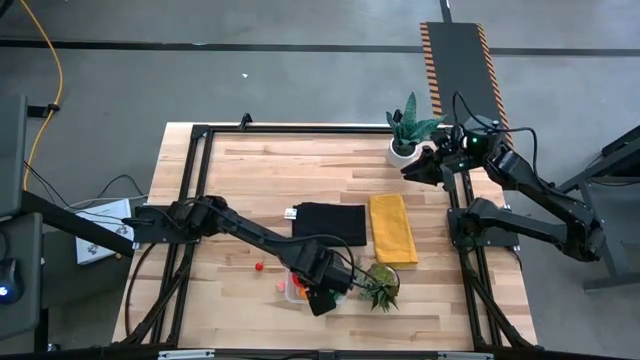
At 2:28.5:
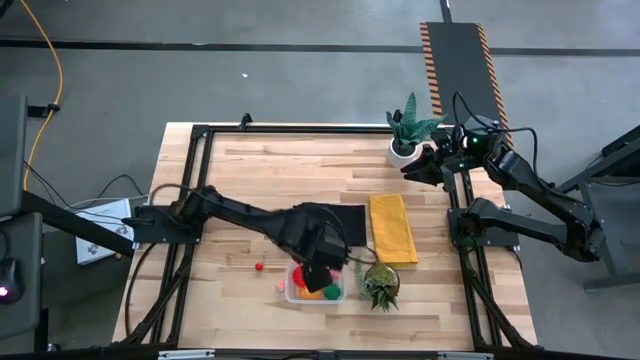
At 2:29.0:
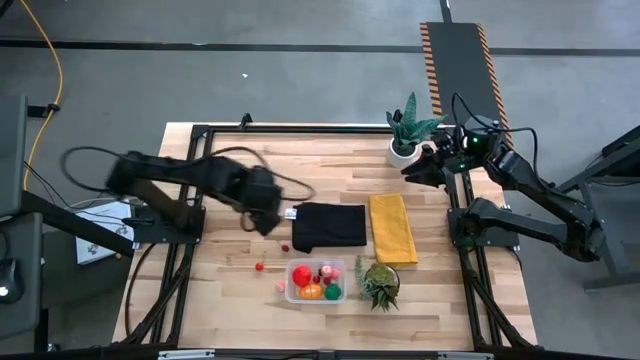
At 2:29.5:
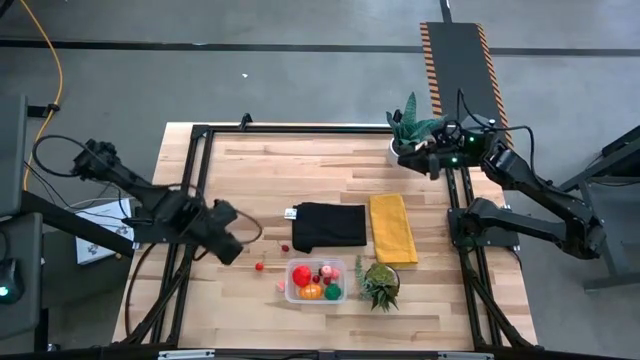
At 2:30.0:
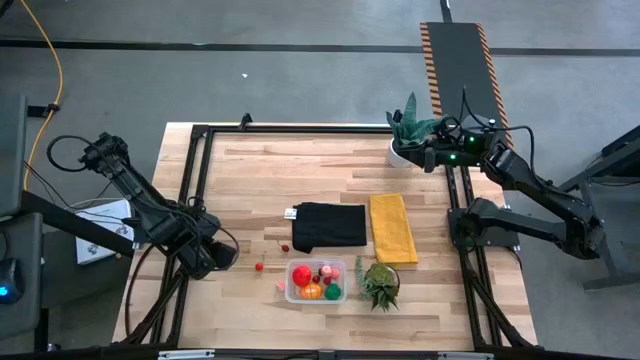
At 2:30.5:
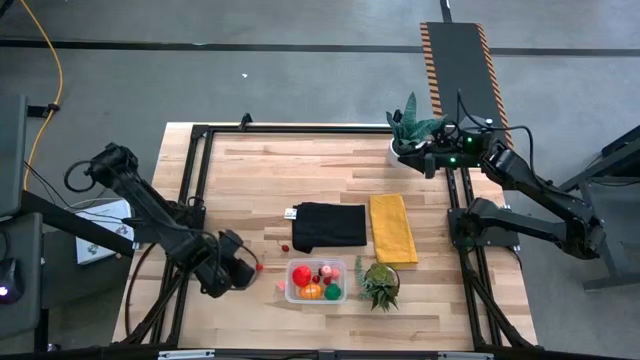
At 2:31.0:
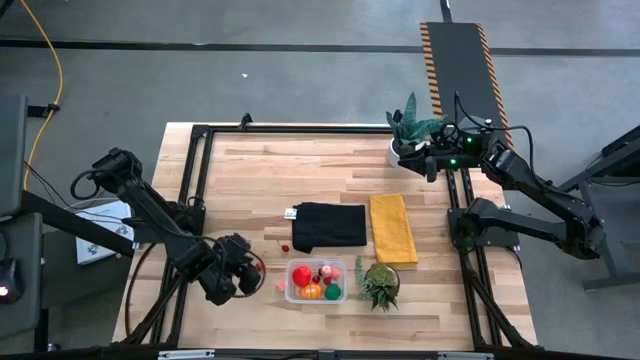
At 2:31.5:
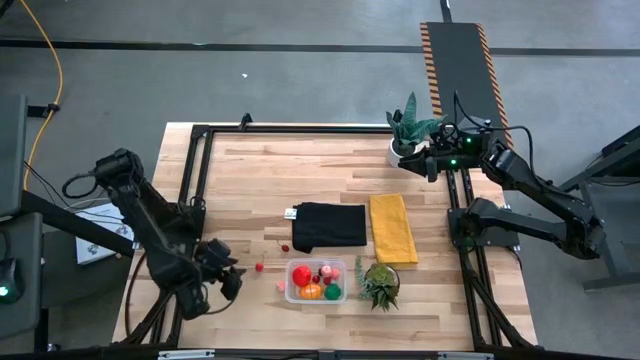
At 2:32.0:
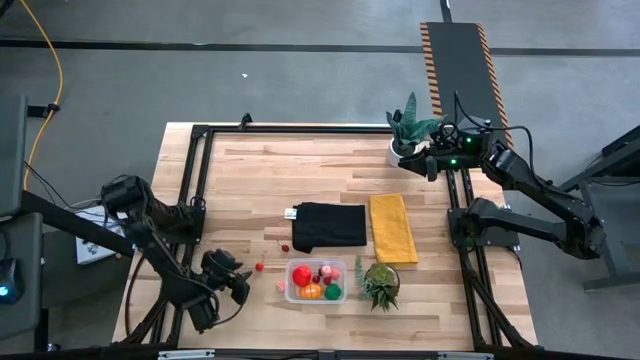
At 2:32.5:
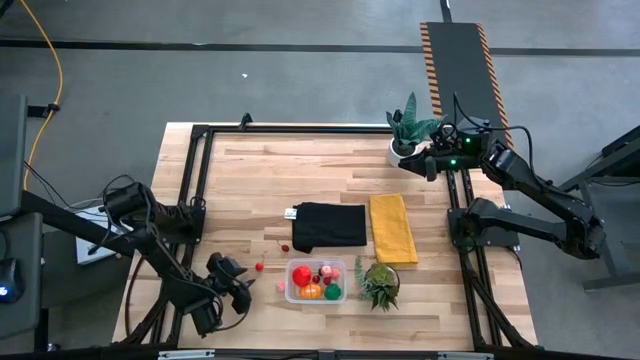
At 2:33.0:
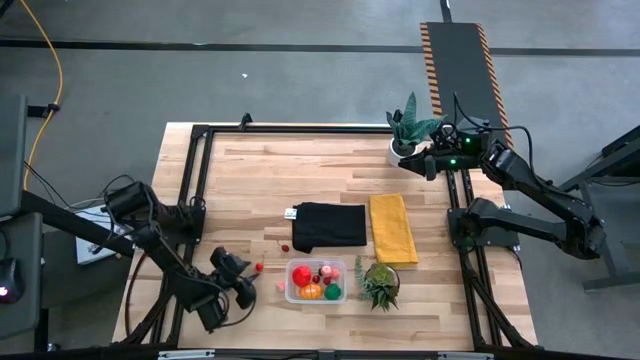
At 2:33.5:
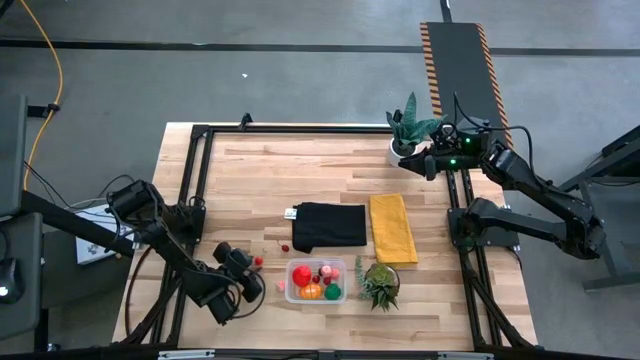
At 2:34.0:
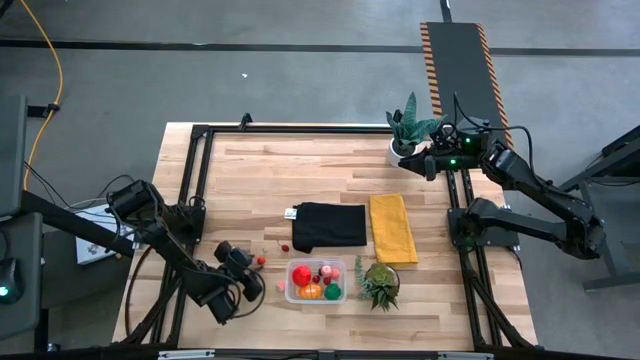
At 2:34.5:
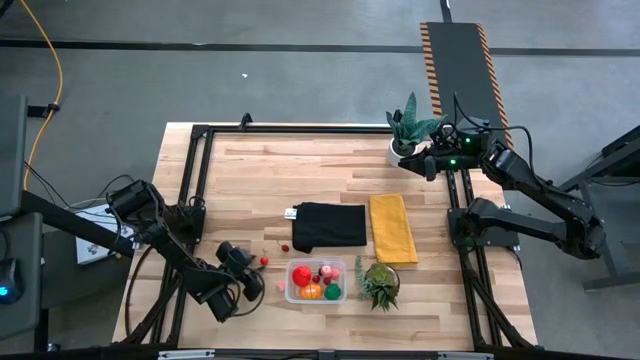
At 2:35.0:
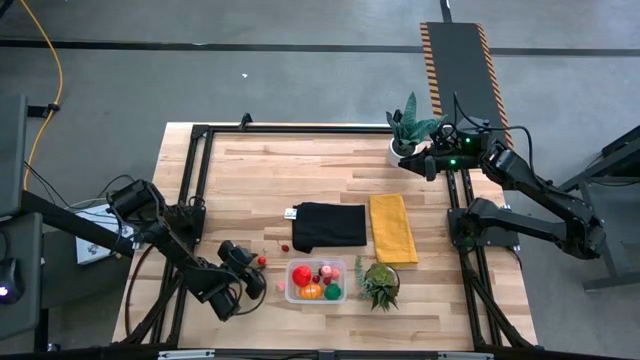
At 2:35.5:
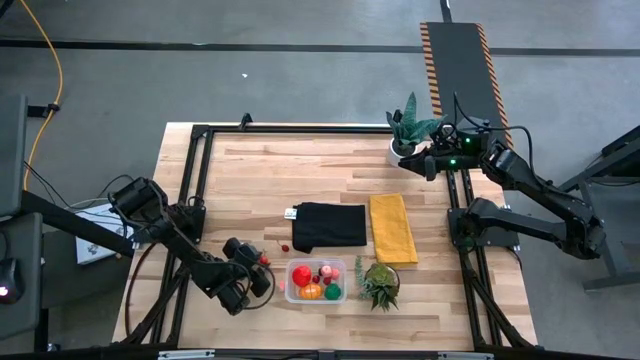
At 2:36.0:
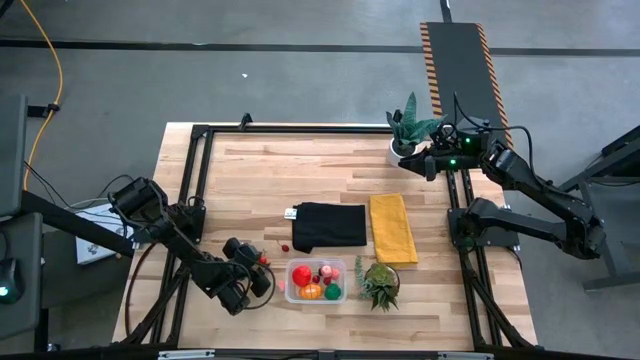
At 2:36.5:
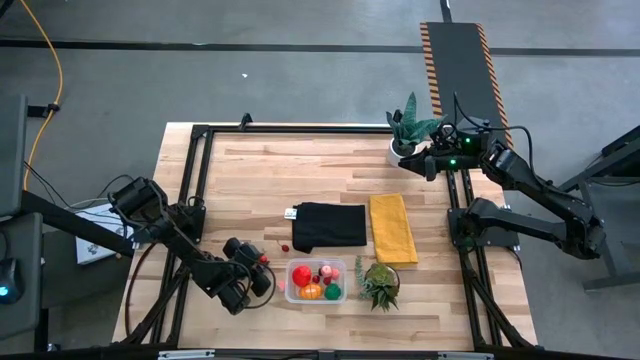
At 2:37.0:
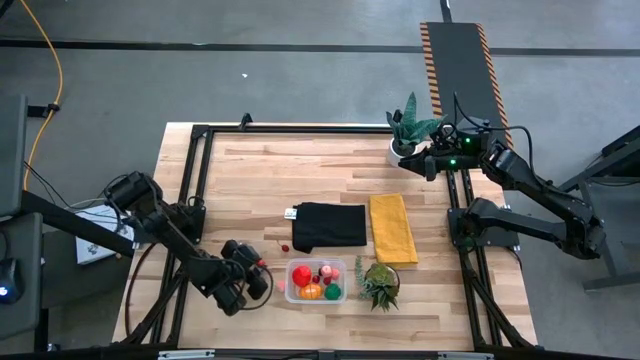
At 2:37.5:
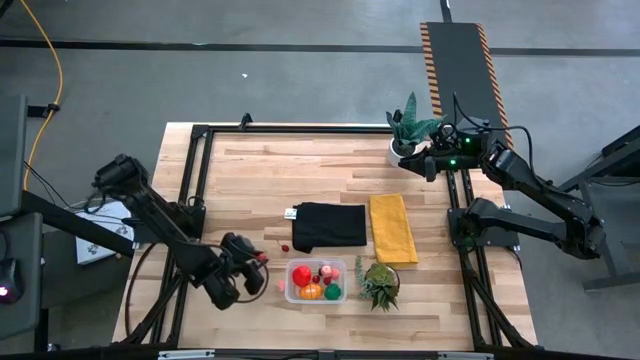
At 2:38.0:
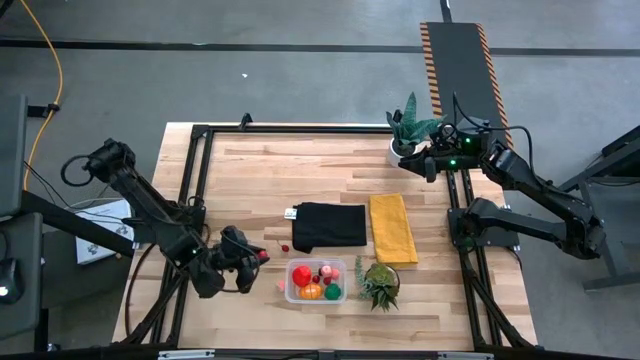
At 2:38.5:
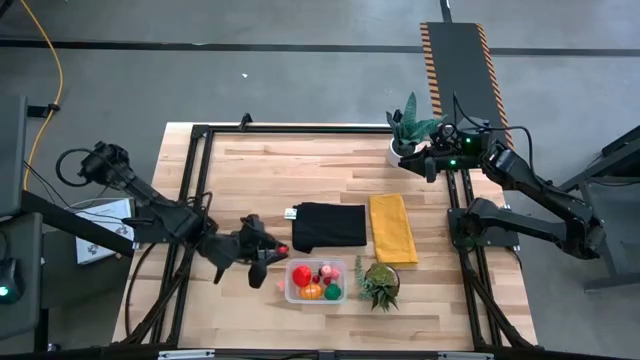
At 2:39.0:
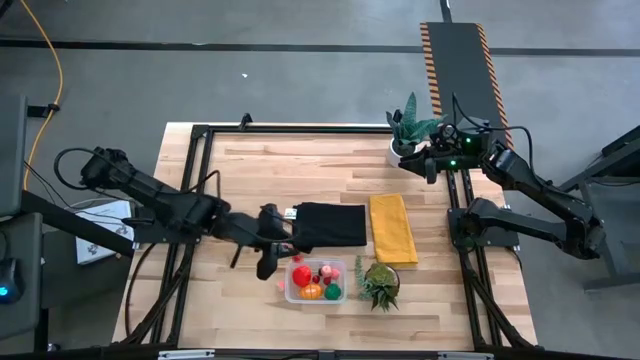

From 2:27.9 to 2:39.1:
Task: Pick and placing Produce into tupperware
Put the bottom red cherry into the transparent bin

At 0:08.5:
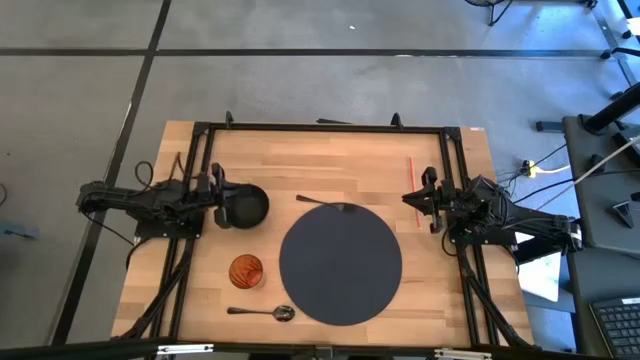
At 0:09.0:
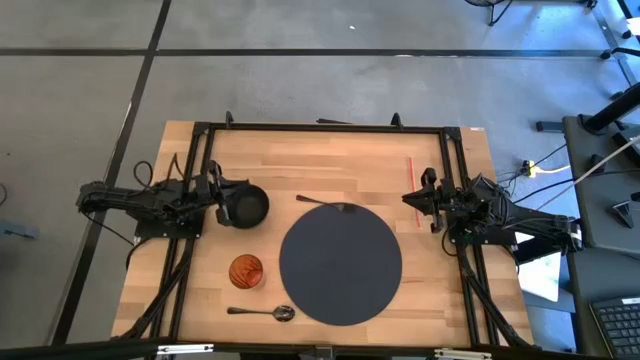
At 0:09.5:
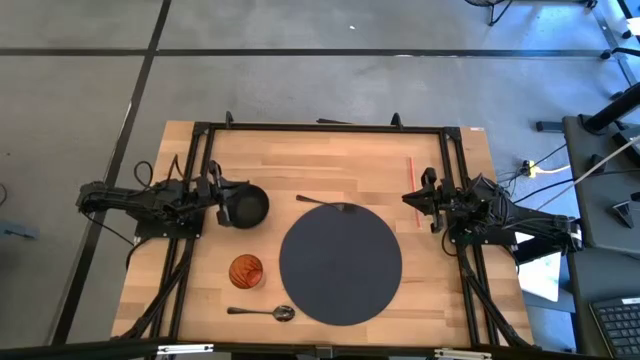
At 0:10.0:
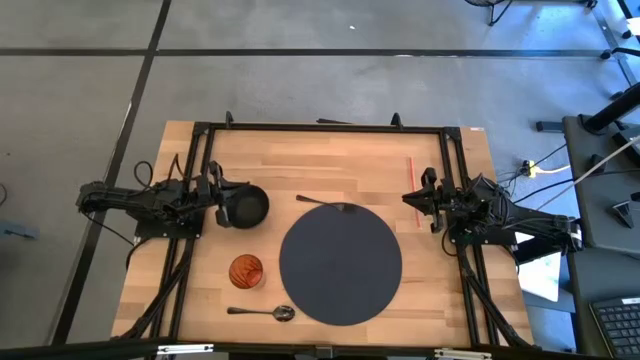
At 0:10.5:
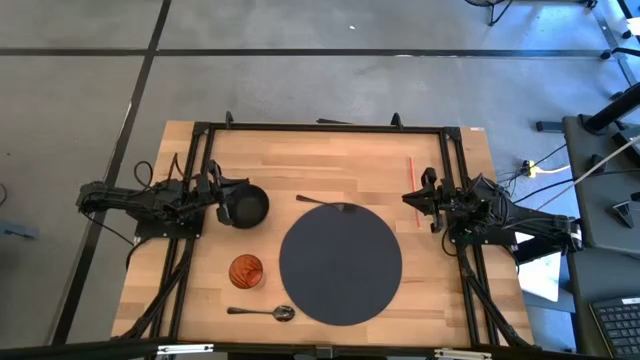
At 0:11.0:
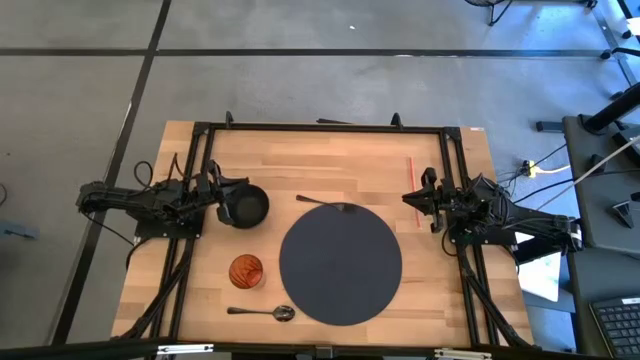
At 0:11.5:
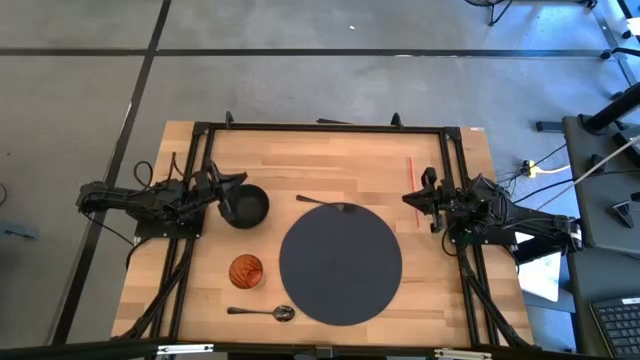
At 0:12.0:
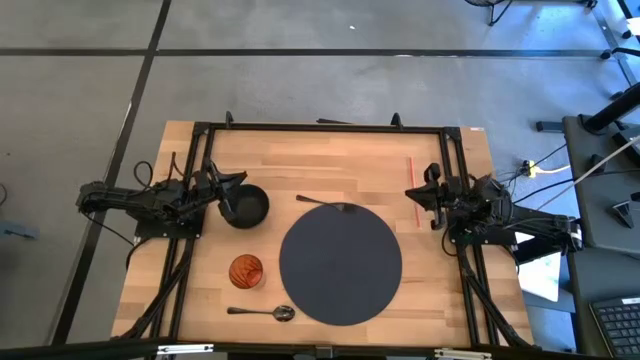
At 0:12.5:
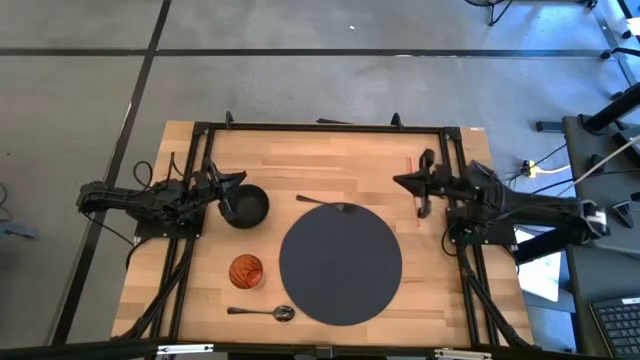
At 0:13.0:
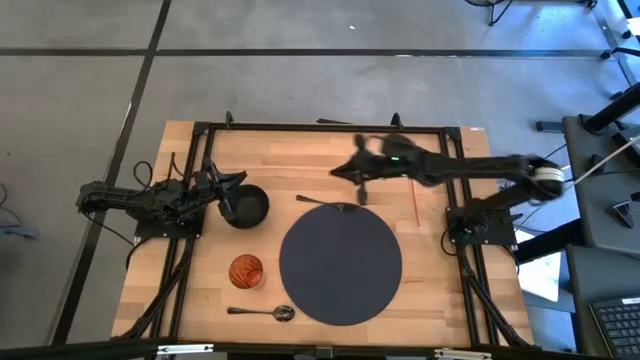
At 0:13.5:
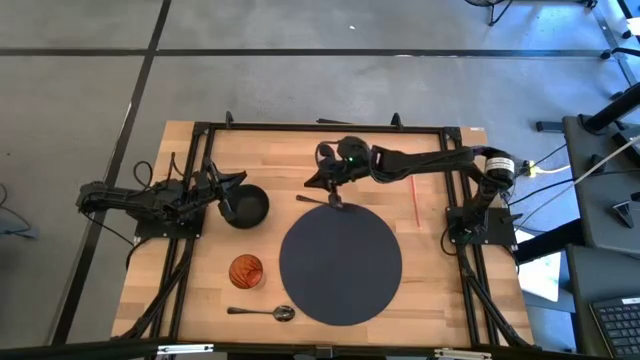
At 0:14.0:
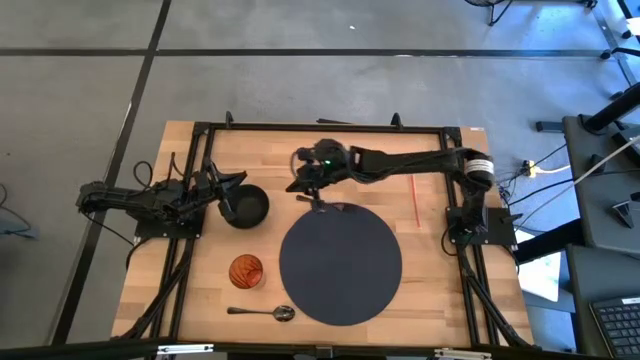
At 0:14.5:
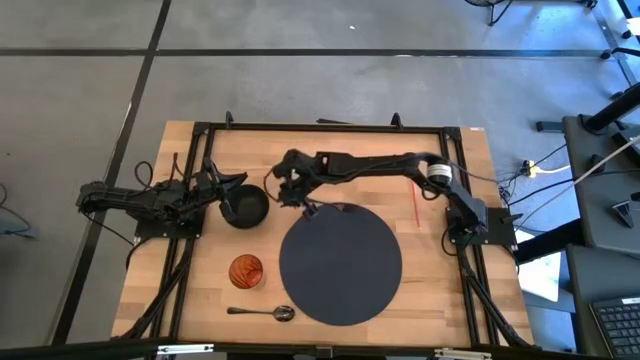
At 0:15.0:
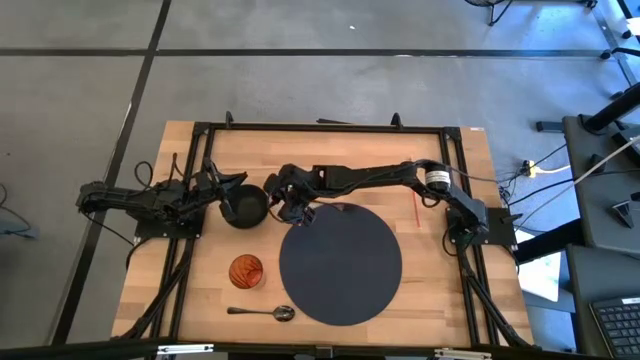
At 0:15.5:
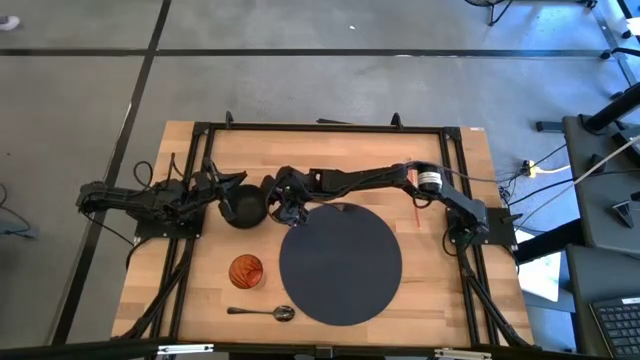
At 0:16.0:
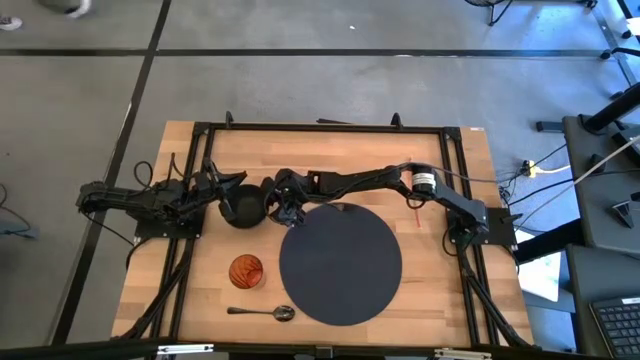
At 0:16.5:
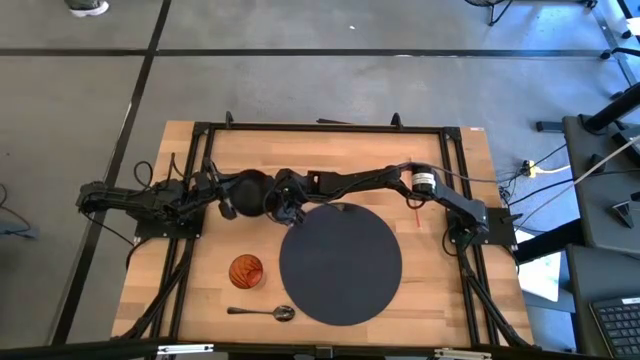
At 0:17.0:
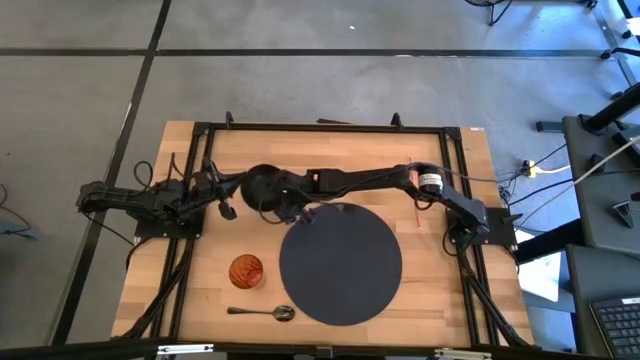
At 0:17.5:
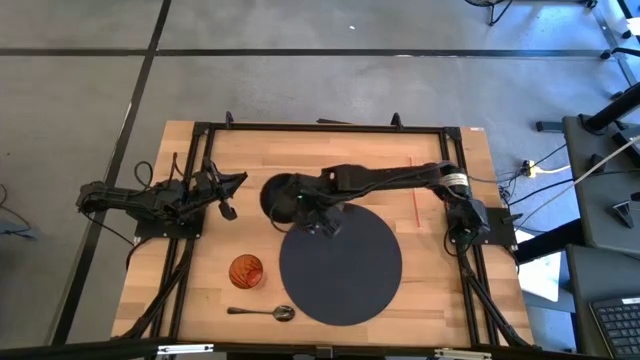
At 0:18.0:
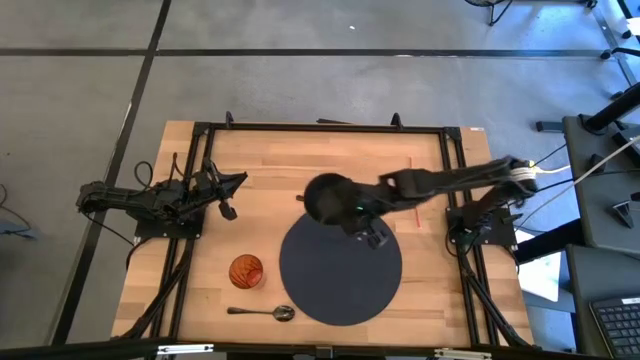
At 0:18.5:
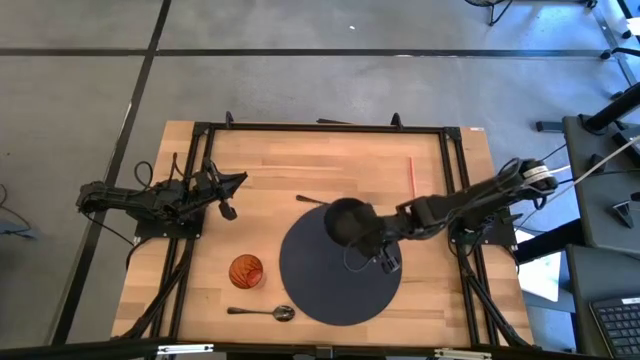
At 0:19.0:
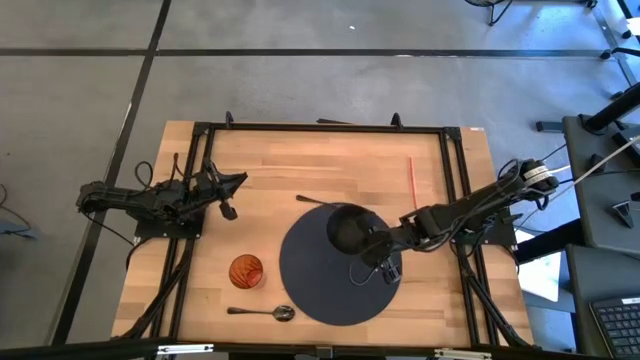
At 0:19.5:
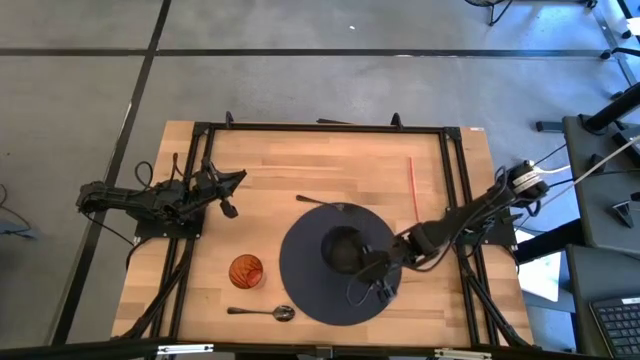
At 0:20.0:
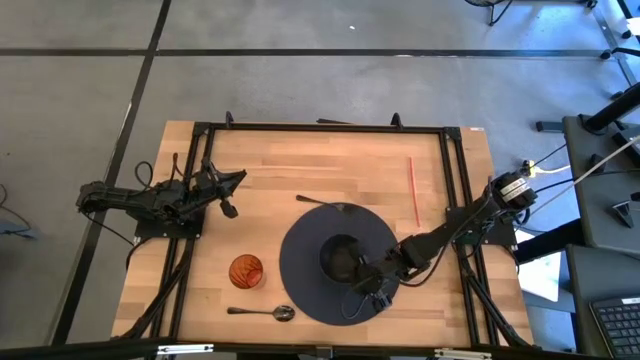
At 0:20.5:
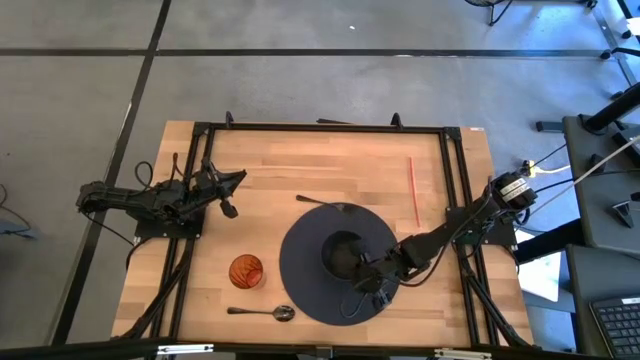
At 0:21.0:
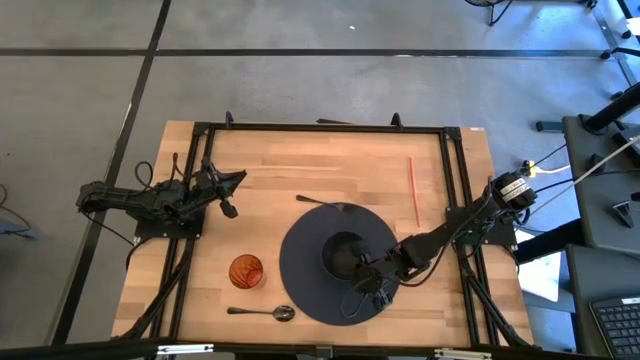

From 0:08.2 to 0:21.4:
Task: Pick & Place Utensil
Put the black bowl on the black mat
